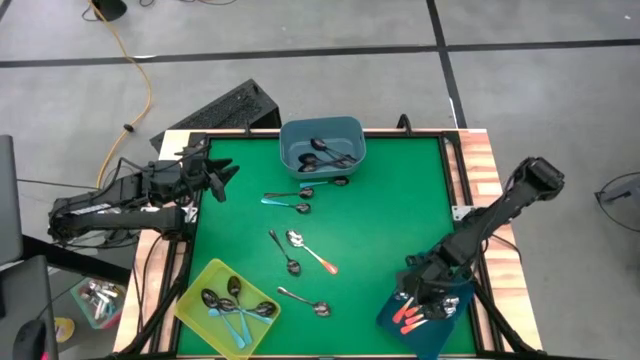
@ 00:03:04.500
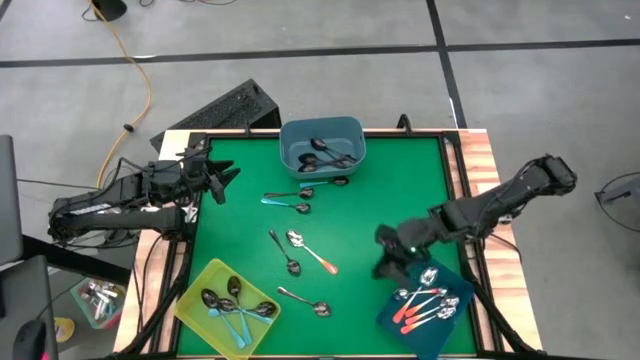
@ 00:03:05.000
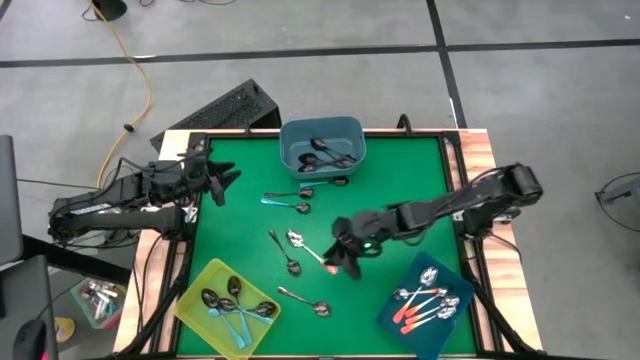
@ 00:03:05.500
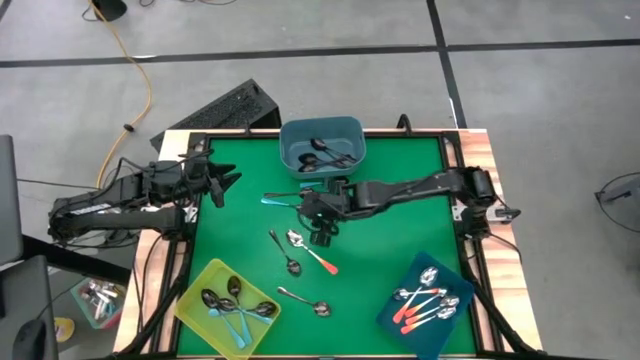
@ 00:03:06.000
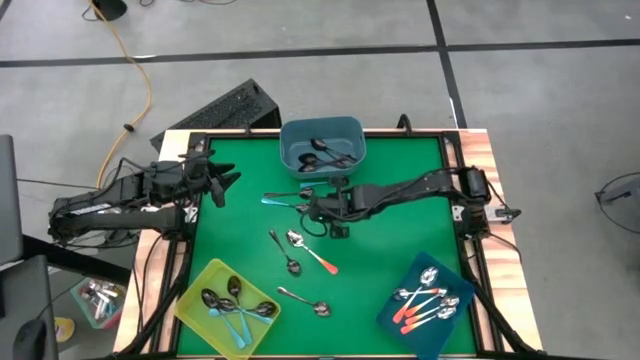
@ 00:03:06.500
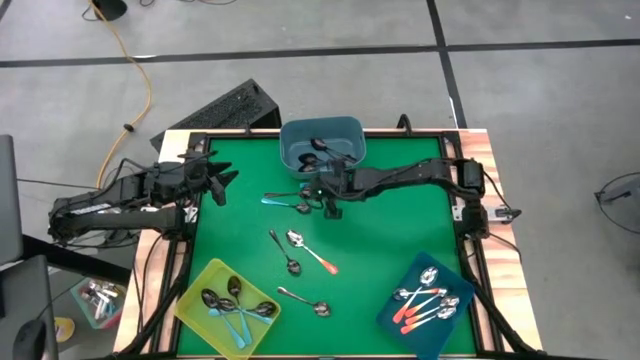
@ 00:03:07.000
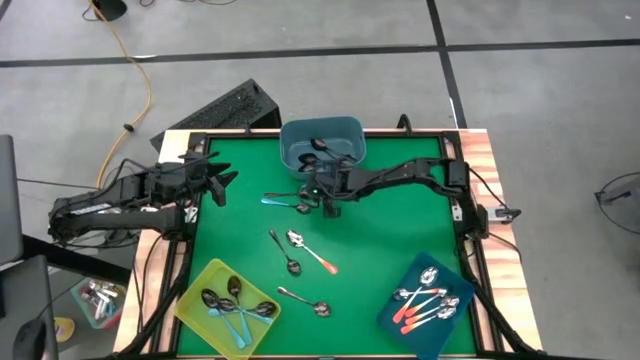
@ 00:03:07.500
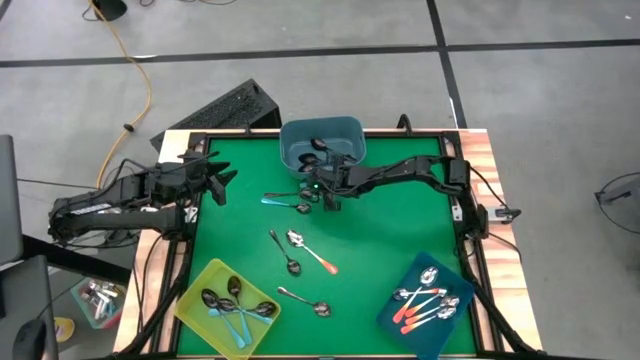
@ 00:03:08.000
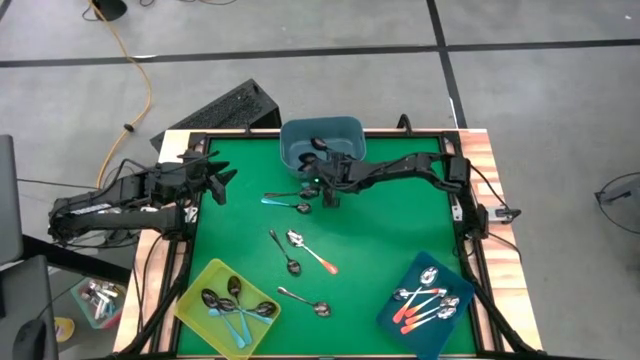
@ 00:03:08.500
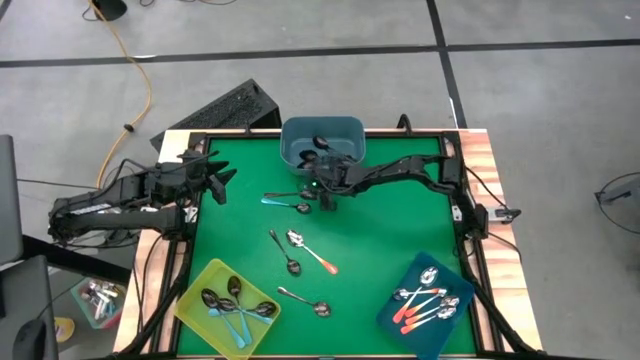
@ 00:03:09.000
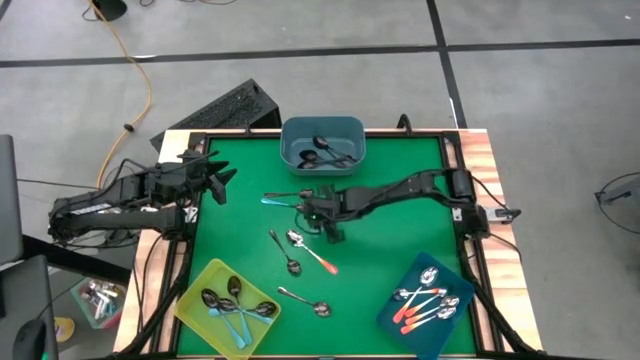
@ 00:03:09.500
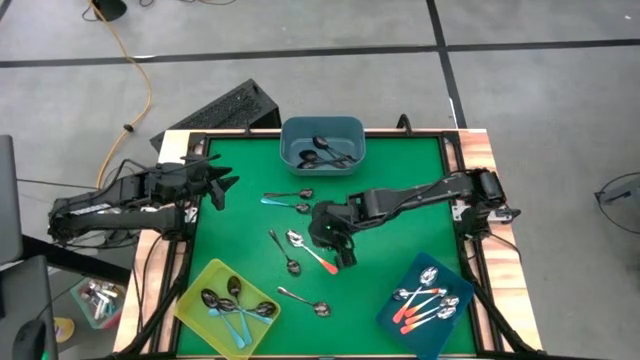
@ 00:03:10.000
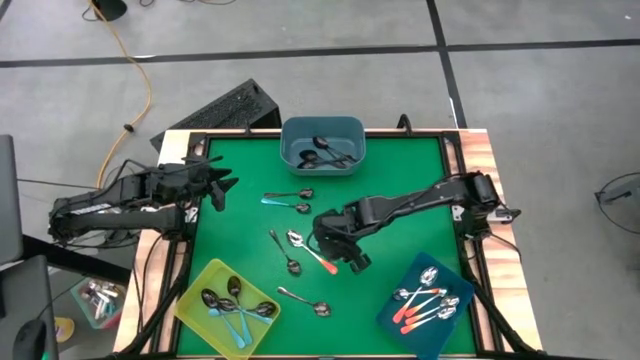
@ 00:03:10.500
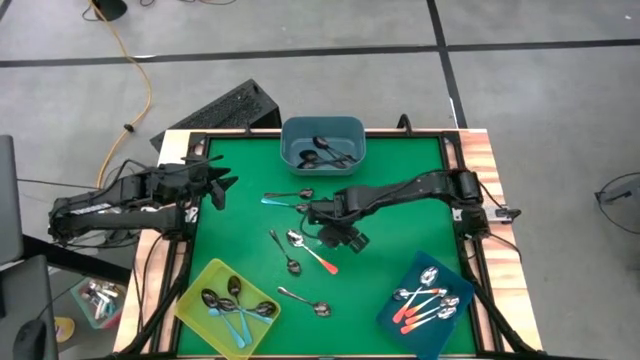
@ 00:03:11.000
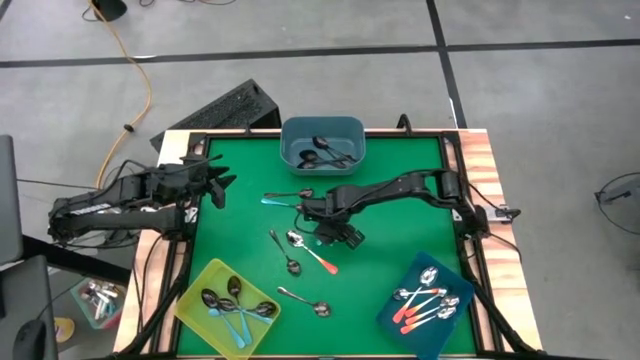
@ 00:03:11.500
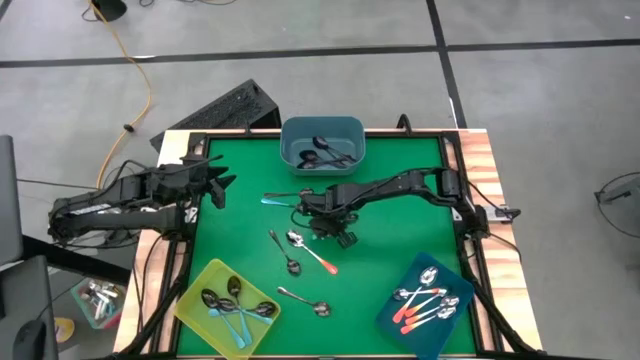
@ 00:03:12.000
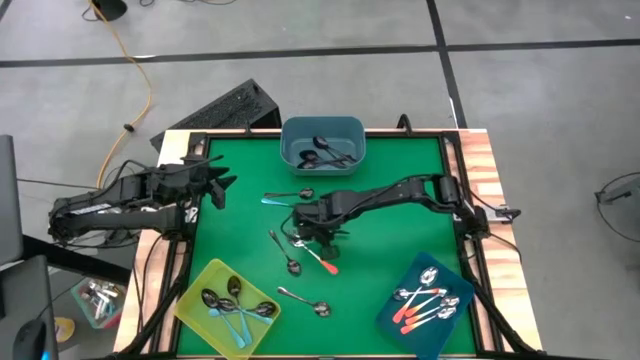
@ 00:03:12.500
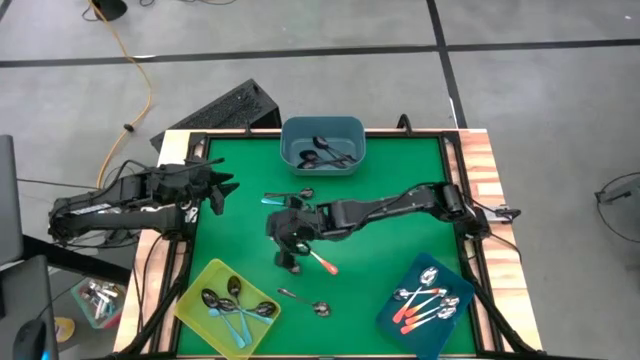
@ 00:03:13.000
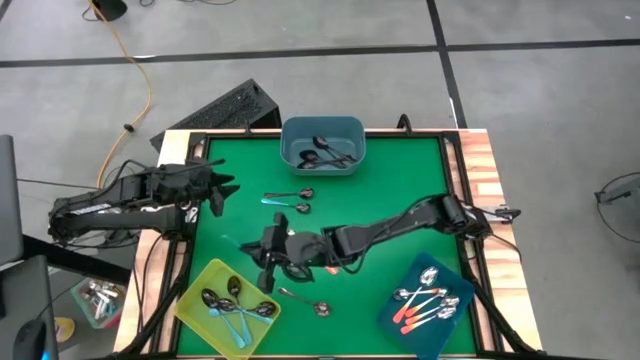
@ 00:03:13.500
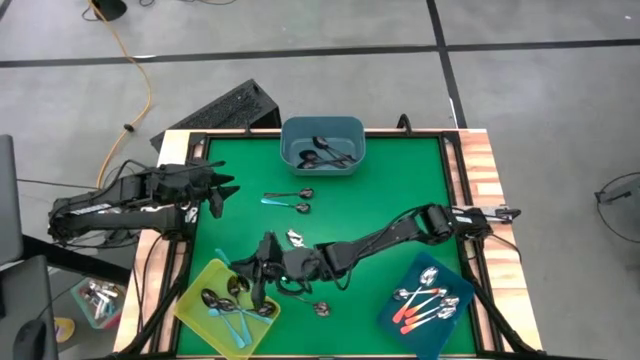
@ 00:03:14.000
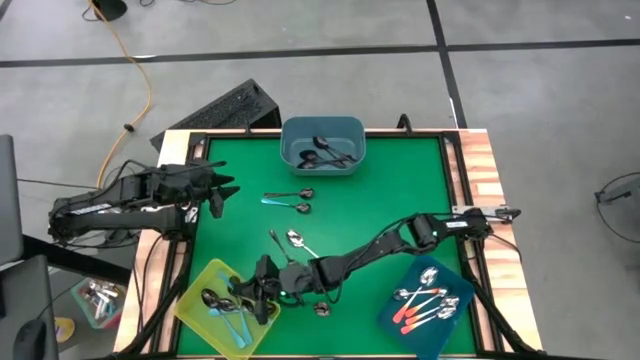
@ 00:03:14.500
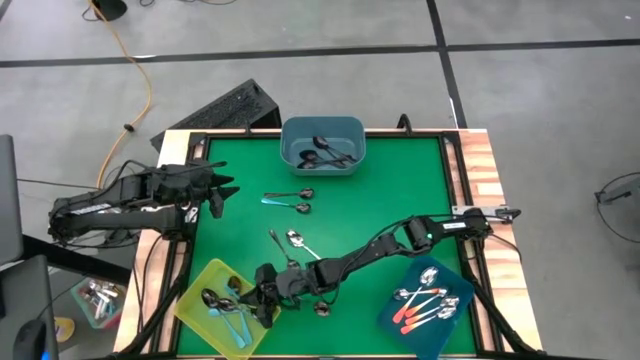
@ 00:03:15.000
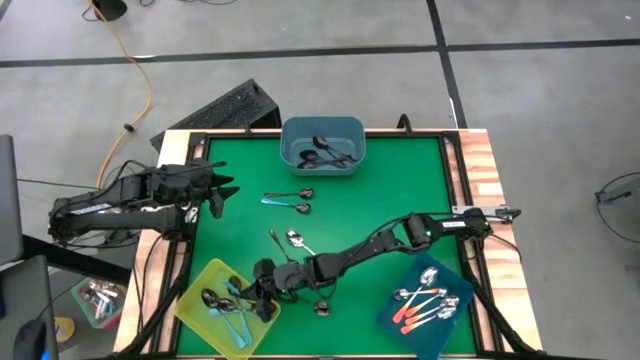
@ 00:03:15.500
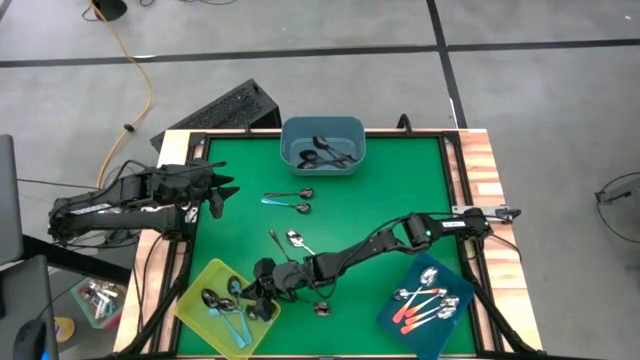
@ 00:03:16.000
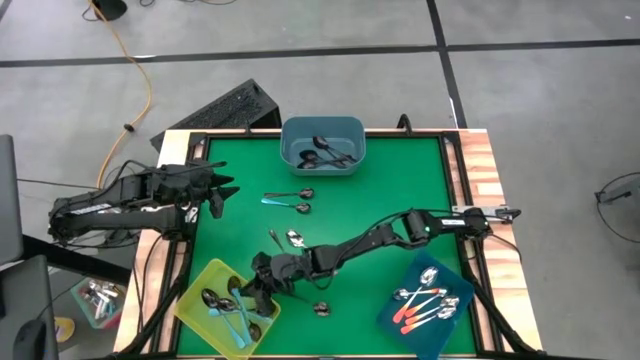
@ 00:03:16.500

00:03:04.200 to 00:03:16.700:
Task: Sort silverware by color (type)
Put the light blue spoon into the yellow bin

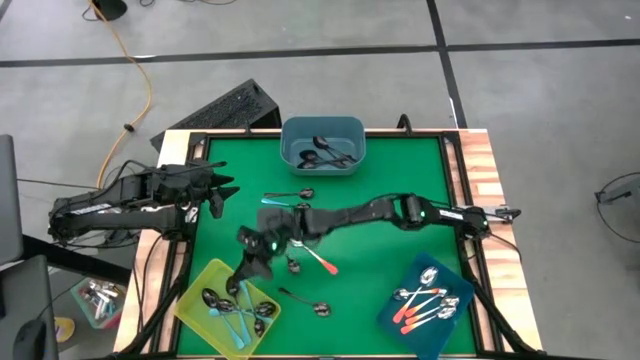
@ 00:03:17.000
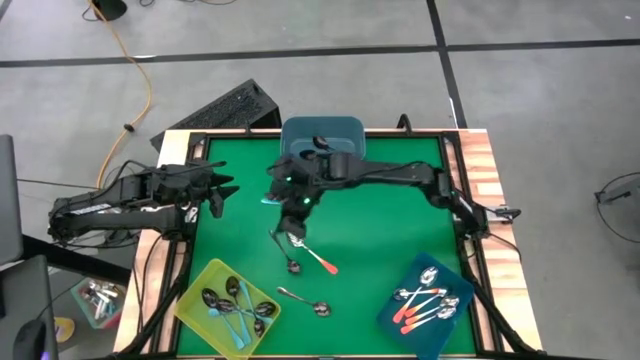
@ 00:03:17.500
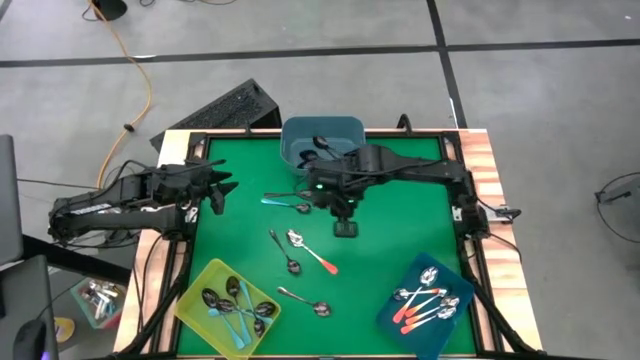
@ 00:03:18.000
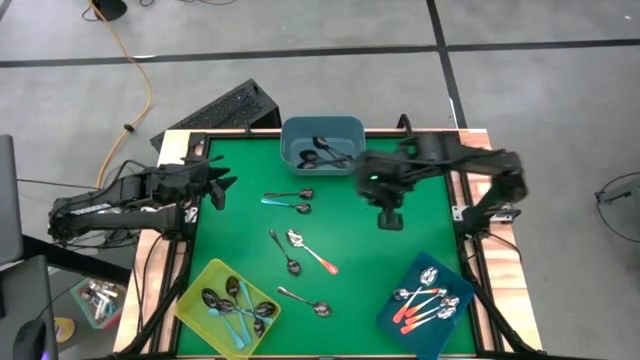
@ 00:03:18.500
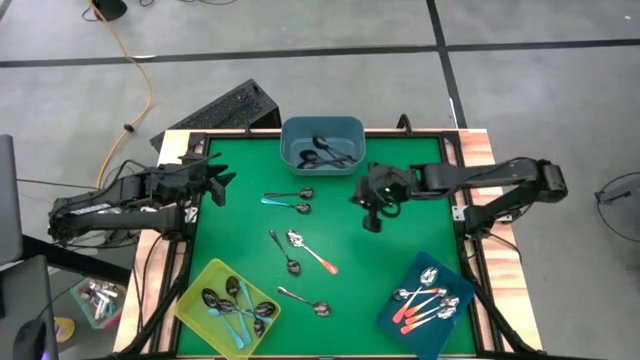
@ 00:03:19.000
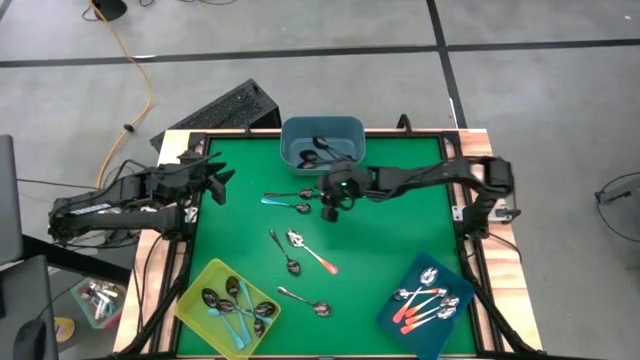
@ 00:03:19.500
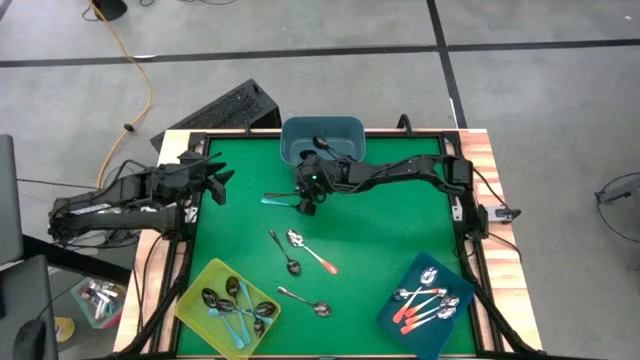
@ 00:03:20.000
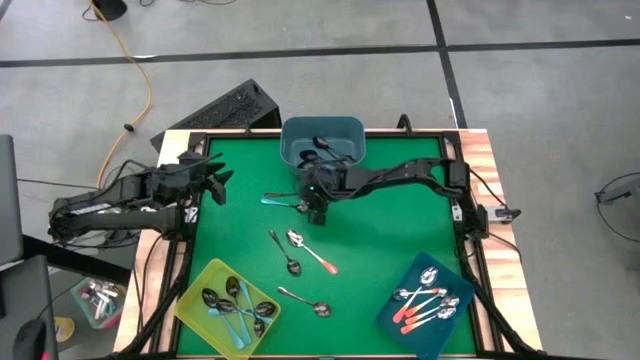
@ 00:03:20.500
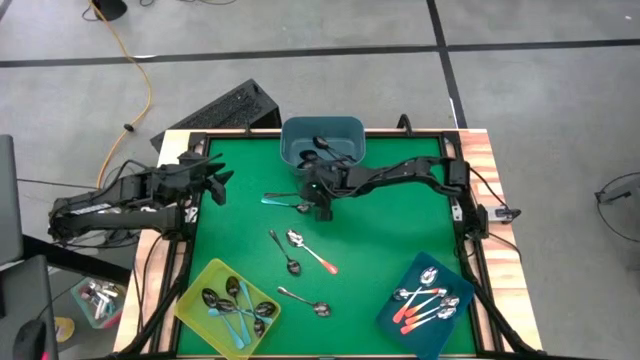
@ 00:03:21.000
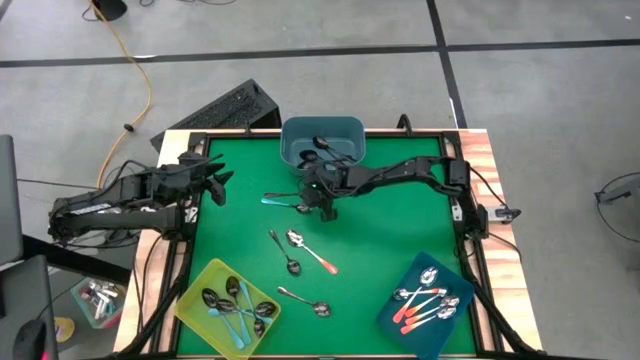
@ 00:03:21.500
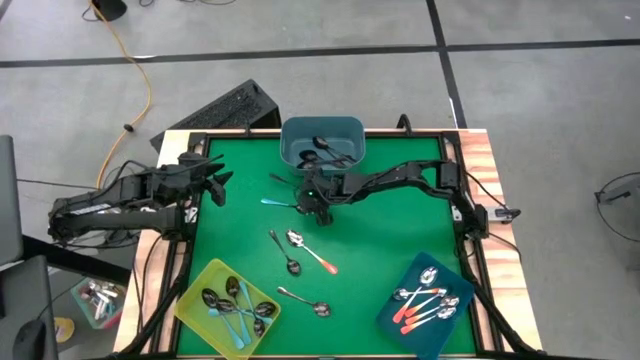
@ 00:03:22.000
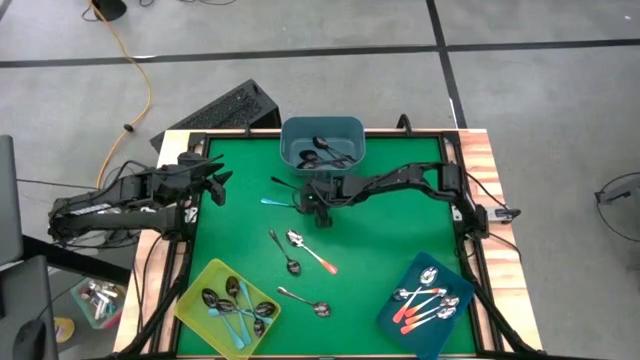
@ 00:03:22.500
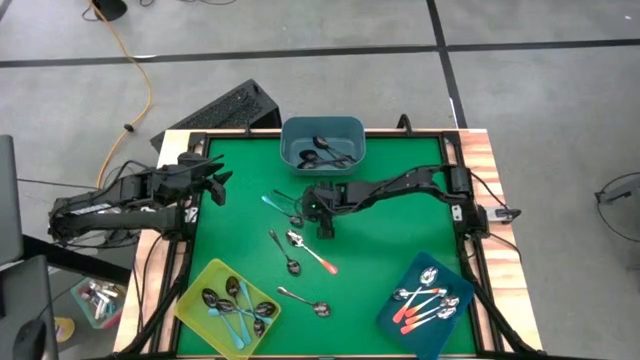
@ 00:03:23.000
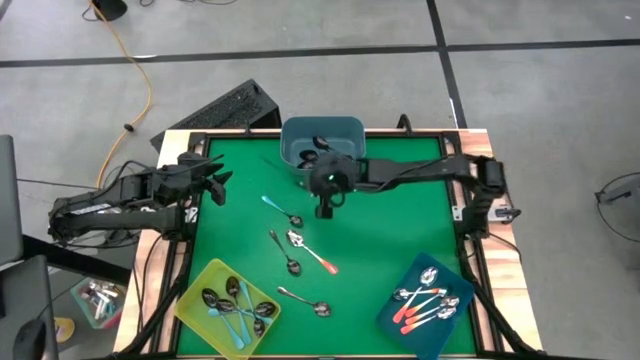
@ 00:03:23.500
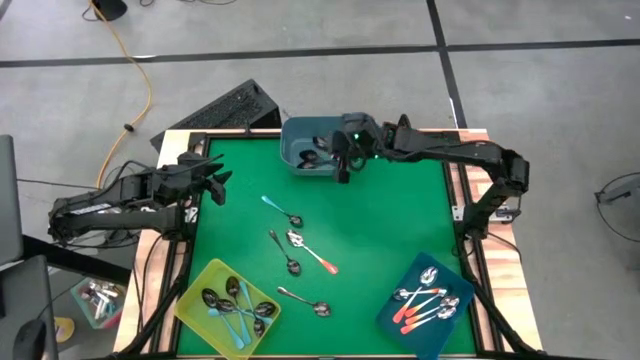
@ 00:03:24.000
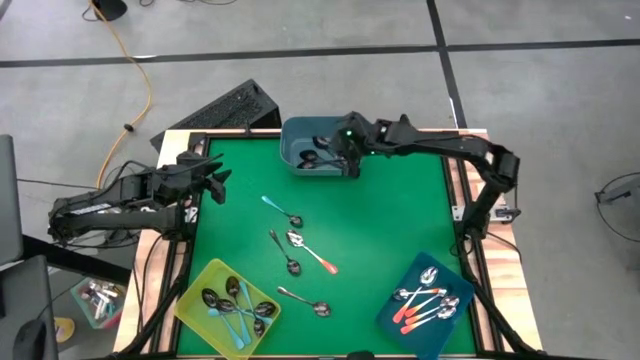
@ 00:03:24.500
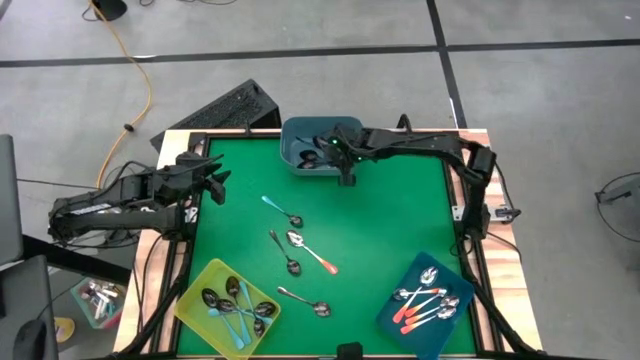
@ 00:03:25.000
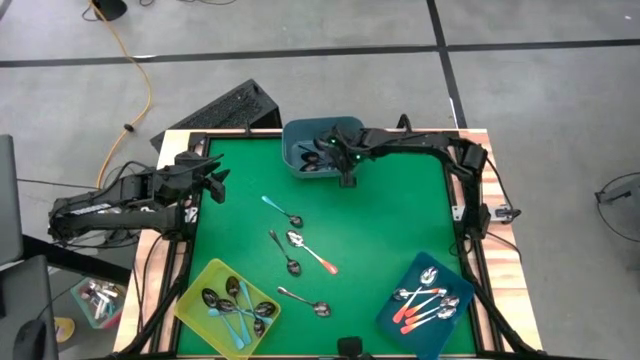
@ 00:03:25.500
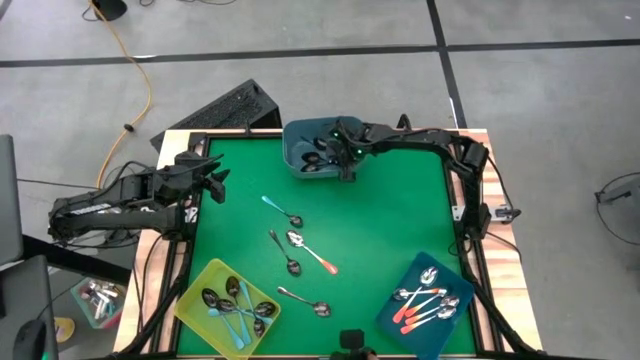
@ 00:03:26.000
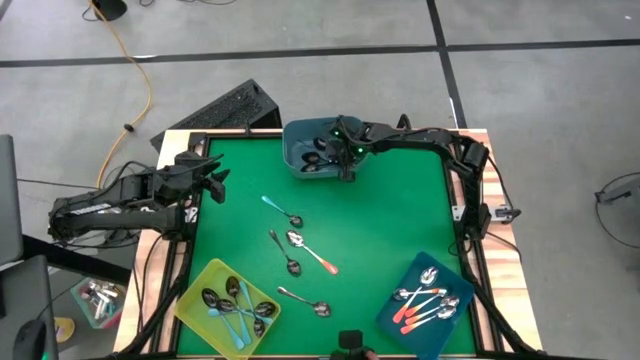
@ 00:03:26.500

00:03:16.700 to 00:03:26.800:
Put the black spoon into the blue bin
